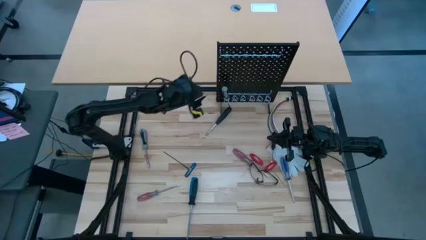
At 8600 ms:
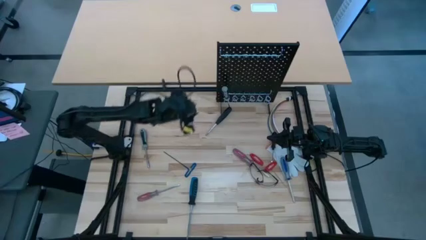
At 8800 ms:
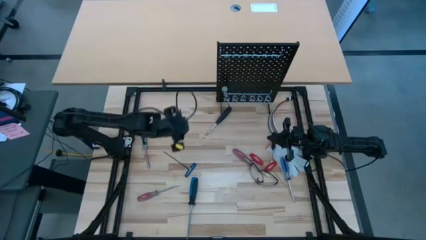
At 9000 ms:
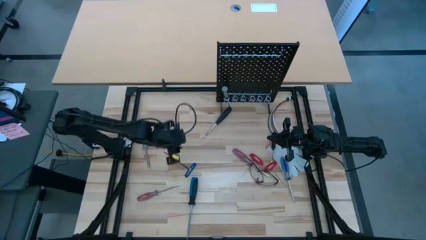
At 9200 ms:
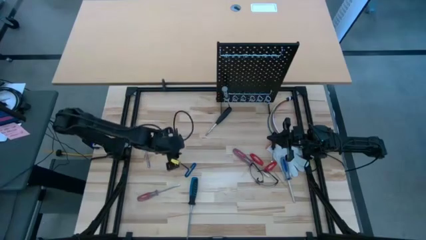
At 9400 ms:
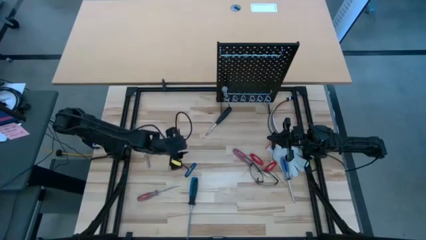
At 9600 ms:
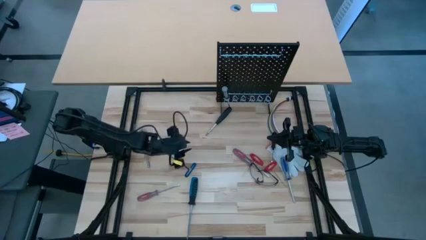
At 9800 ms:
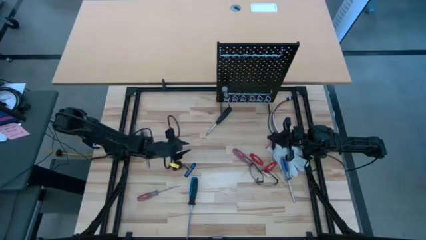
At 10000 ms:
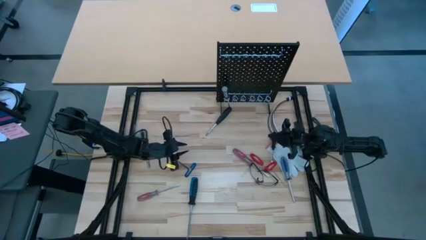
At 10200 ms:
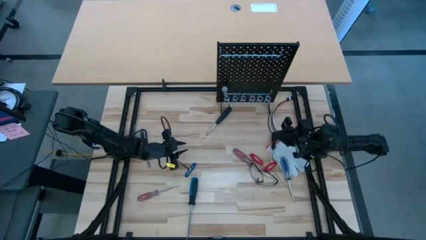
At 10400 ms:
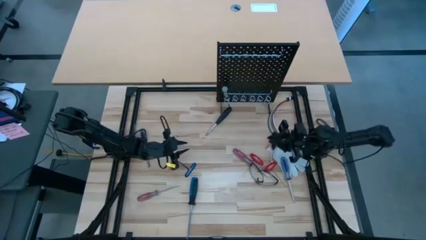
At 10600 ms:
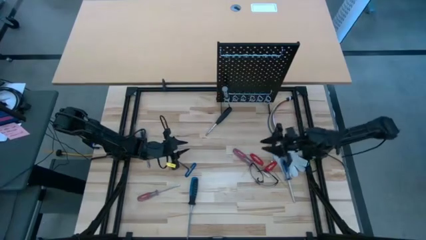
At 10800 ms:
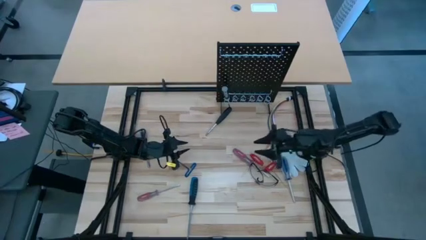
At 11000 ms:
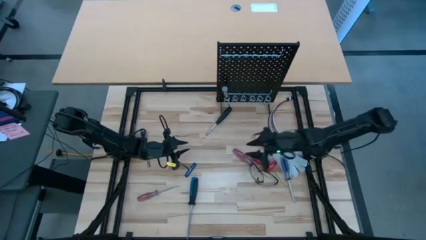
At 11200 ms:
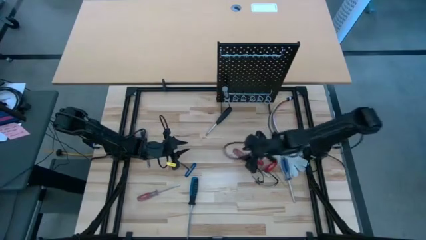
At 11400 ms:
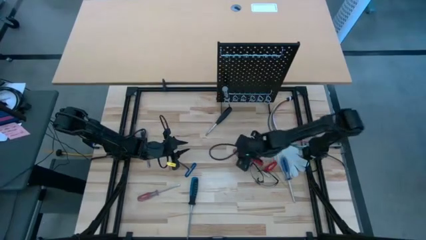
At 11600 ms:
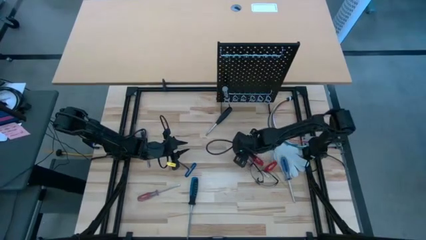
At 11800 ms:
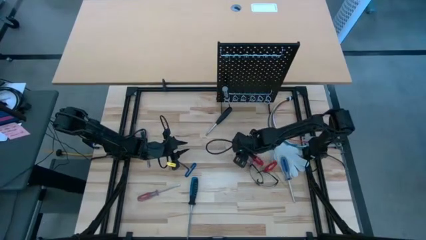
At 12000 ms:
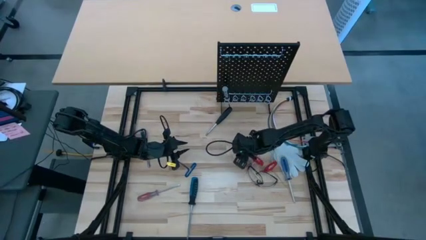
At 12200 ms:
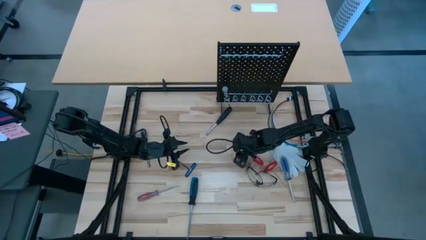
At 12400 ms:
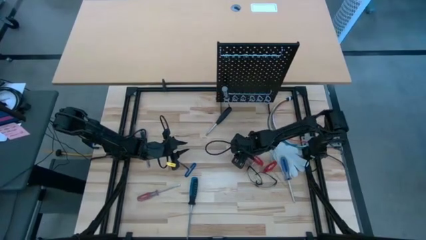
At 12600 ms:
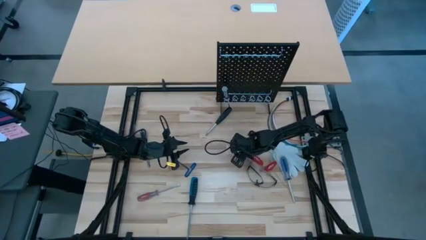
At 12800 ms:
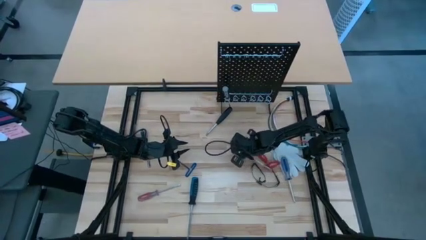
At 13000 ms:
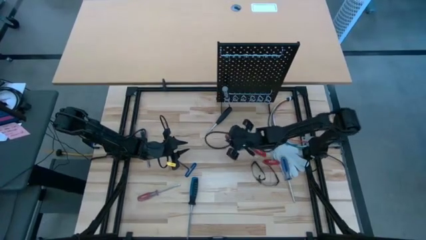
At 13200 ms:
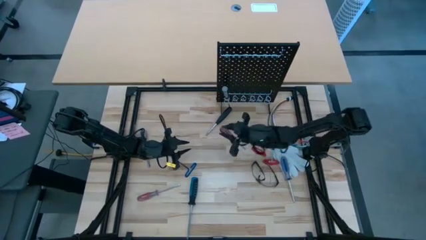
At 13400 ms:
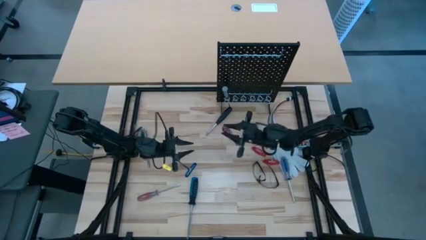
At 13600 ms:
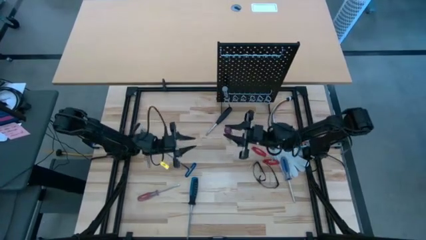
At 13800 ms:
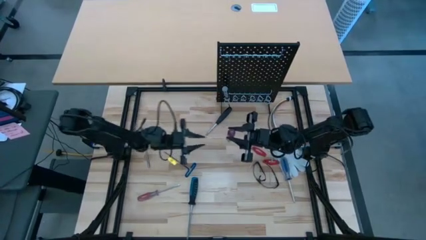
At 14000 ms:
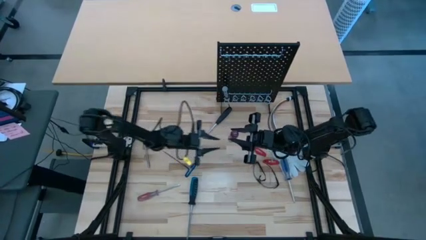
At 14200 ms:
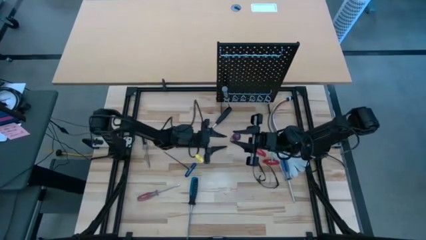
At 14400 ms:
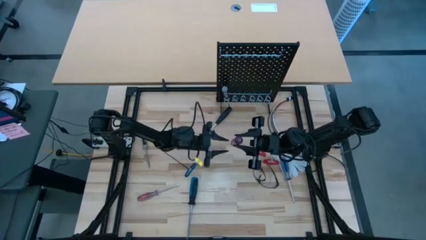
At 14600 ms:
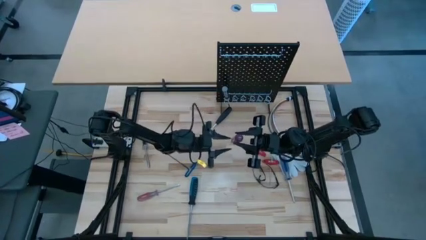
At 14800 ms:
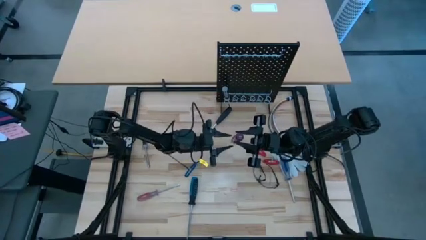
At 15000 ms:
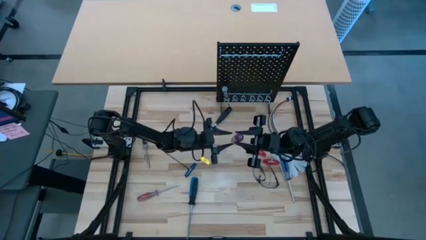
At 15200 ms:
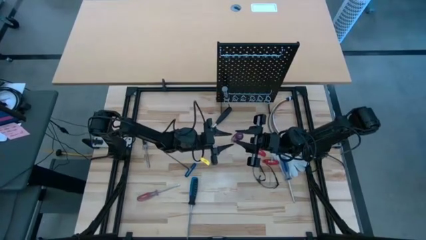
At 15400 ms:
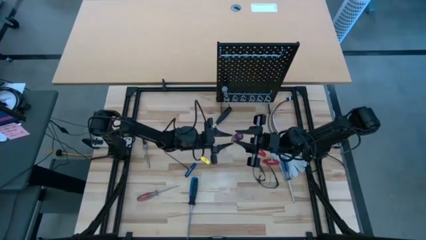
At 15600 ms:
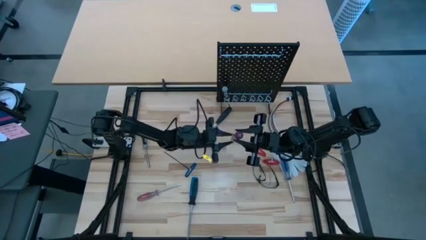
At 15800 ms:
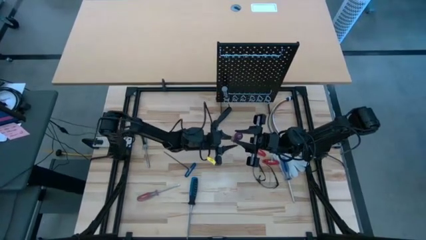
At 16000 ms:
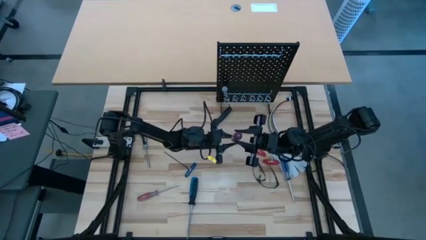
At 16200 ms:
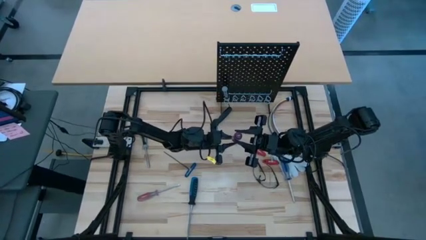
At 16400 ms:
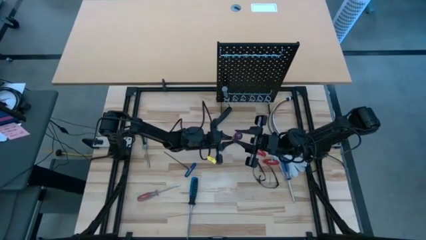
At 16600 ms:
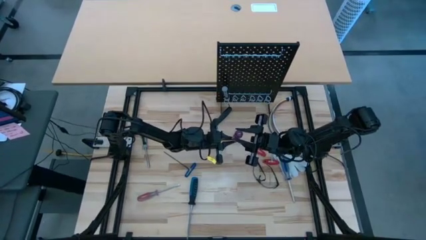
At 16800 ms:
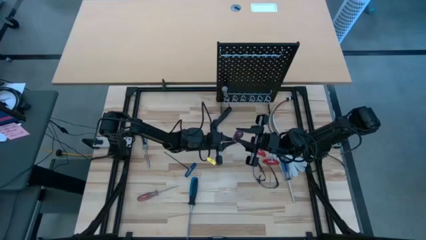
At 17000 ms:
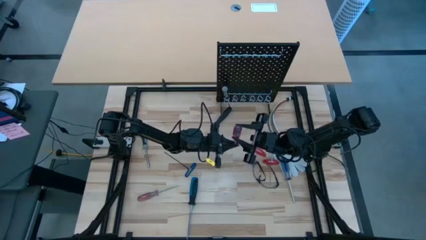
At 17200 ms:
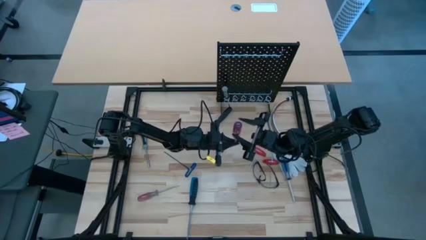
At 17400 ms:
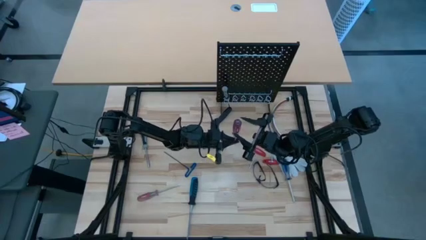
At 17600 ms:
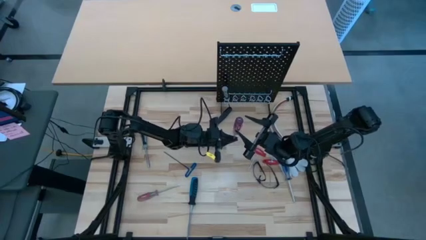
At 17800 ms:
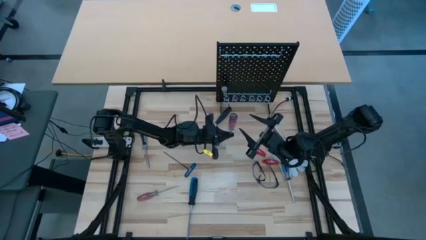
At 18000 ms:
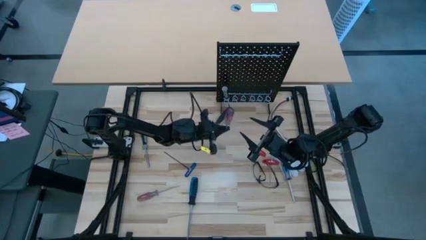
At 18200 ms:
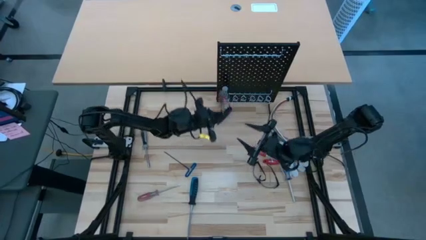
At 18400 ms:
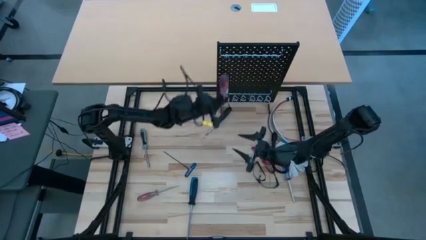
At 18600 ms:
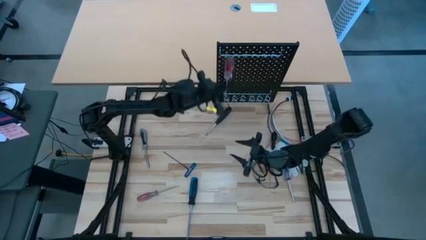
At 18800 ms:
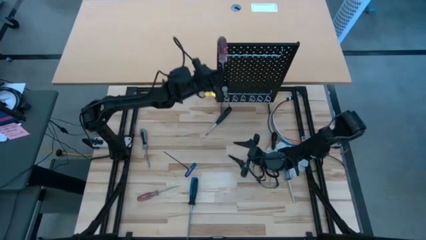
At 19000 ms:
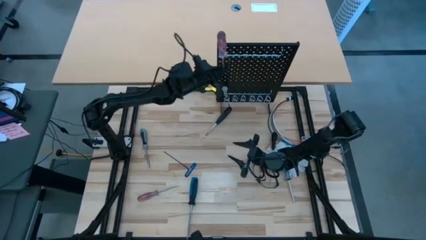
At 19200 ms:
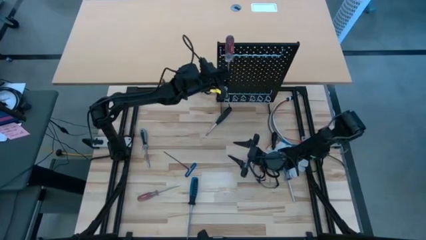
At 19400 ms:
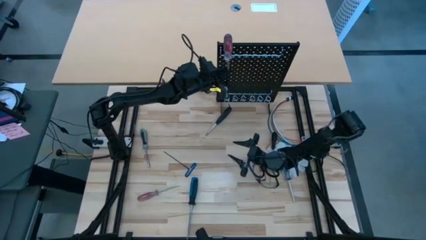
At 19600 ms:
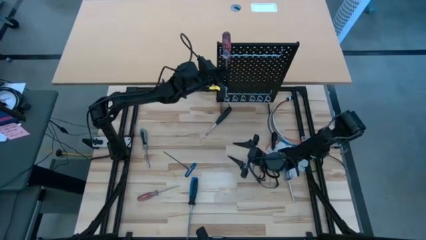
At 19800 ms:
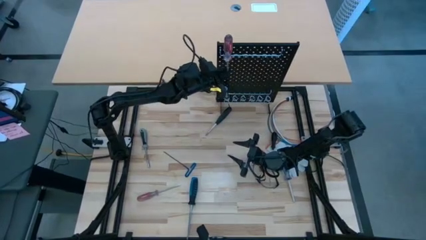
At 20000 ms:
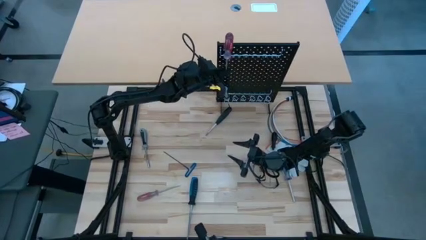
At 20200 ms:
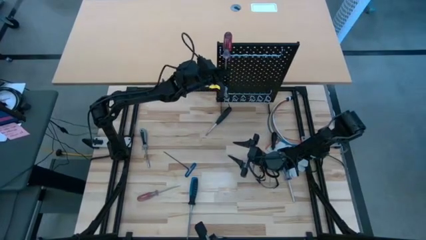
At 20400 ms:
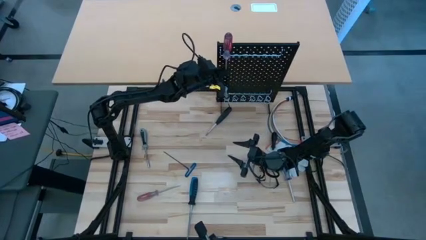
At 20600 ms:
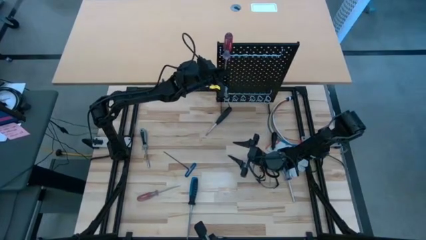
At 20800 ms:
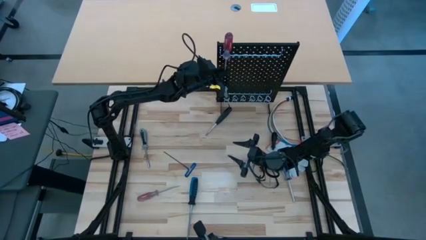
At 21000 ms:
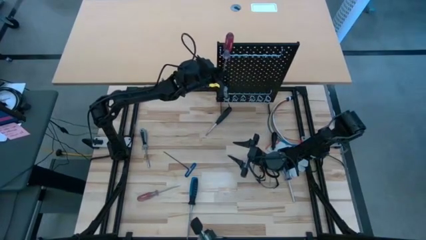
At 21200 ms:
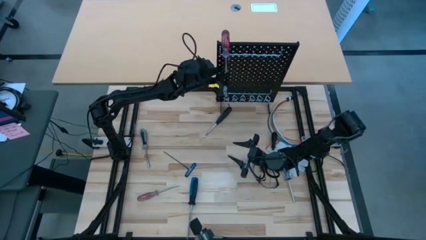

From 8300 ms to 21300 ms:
Task: Hang tools onto peg board
Hang the right red screwdriver on the pegboard
